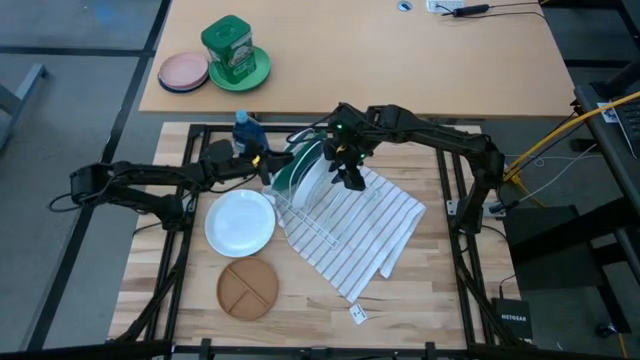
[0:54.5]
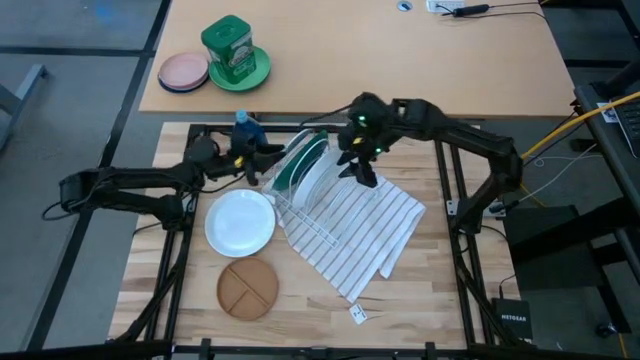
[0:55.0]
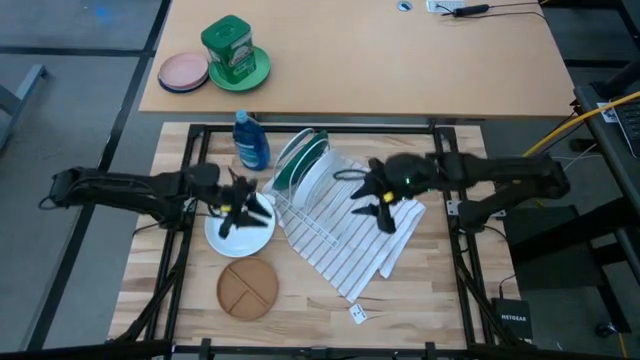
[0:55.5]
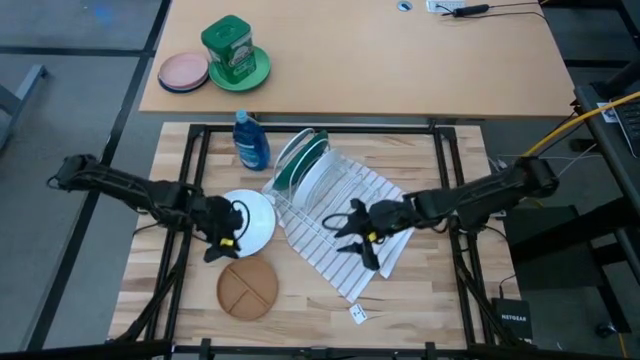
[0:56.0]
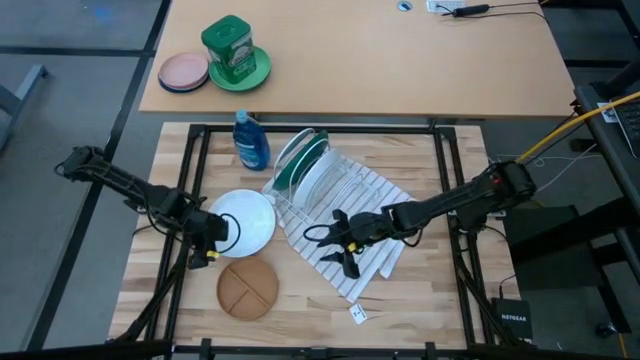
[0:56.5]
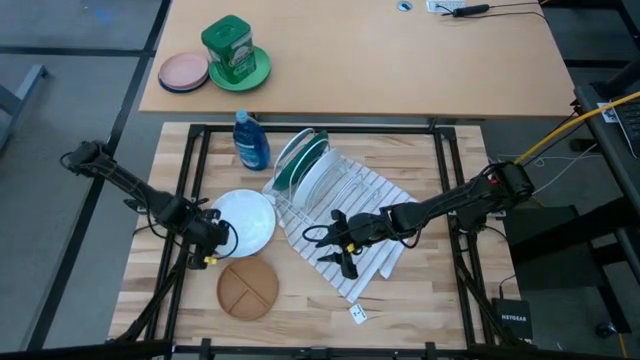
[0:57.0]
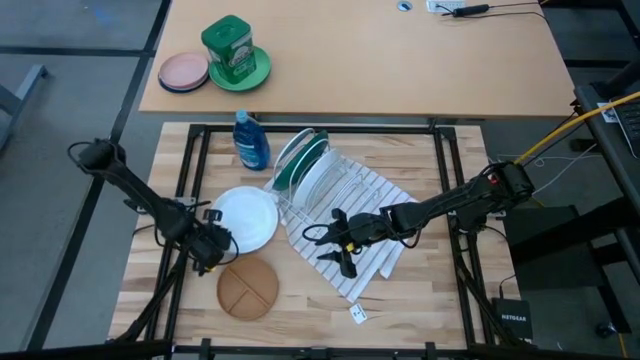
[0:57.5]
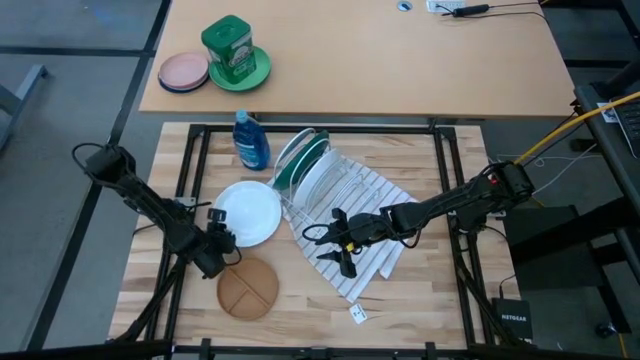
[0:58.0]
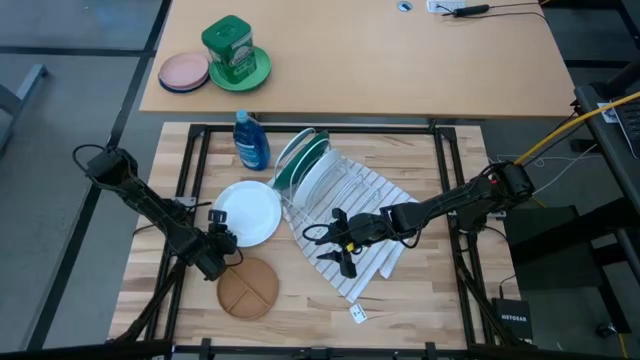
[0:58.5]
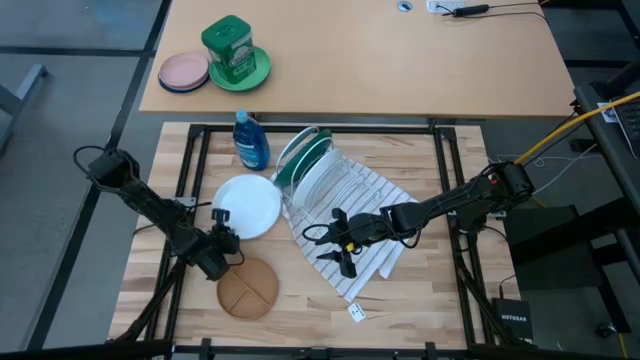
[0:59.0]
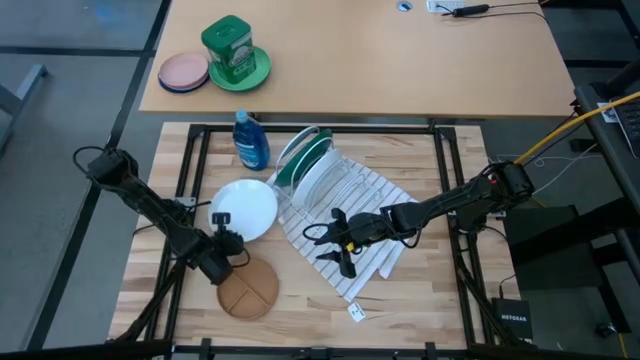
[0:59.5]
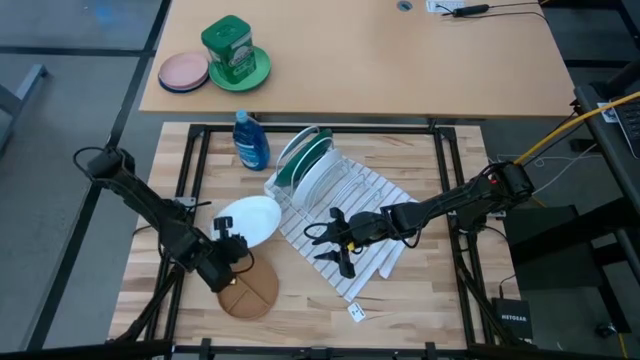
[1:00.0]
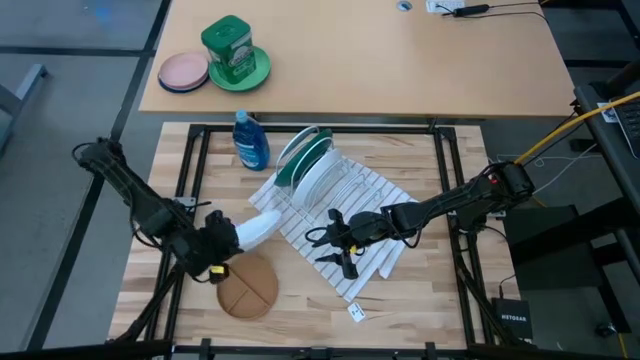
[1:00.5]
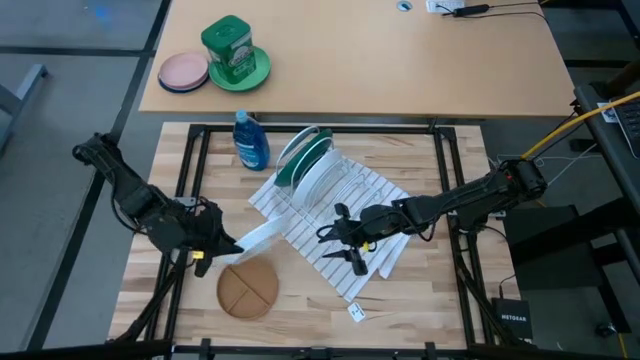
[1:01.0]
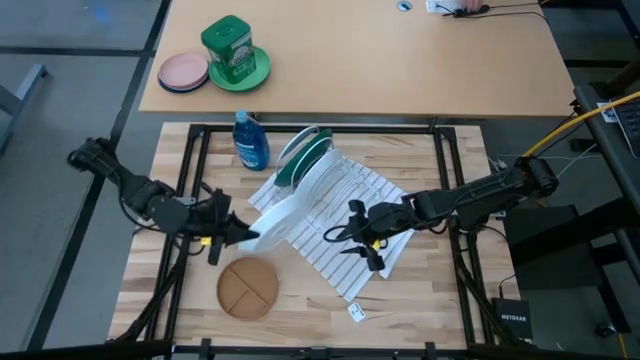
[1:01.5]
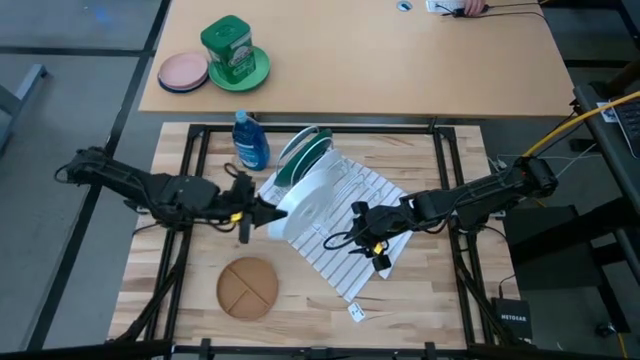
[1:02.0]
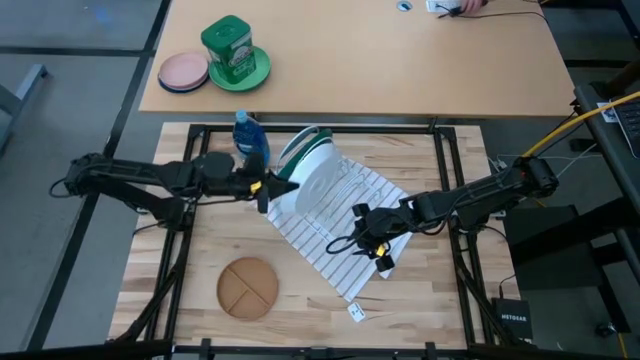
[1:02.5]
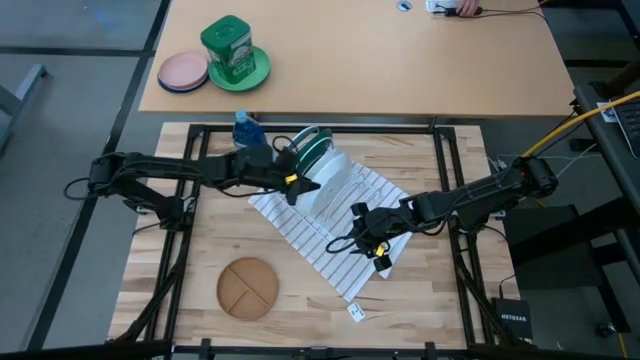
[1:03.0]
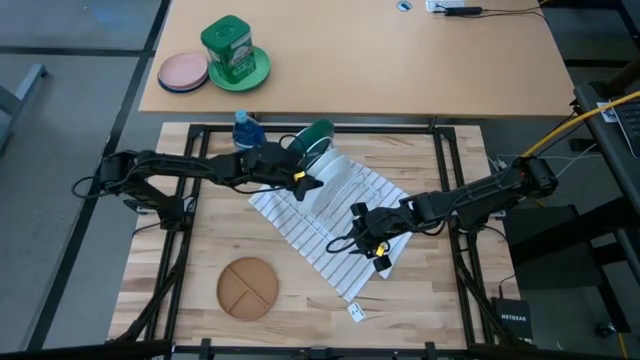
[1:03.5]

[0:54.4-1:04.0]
Task: Sort dishes
Put the white plate into the white dish rack

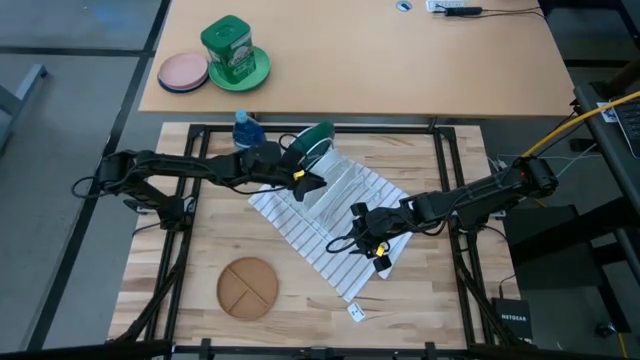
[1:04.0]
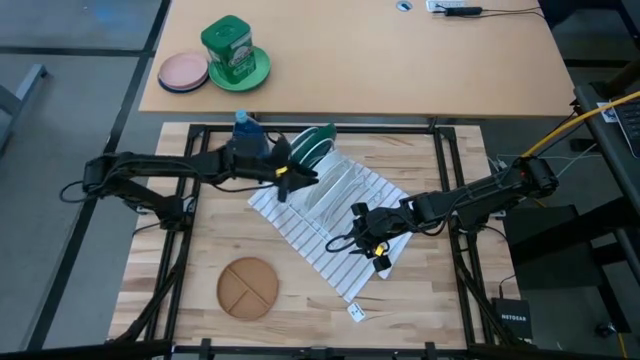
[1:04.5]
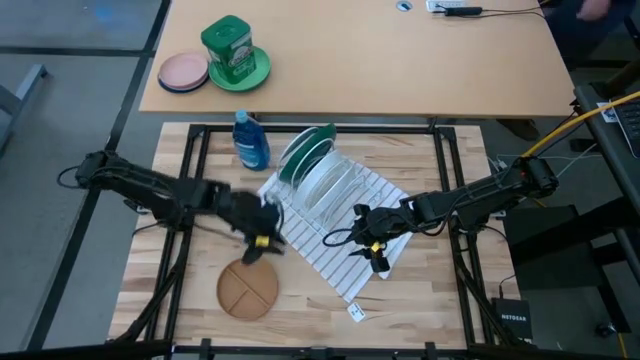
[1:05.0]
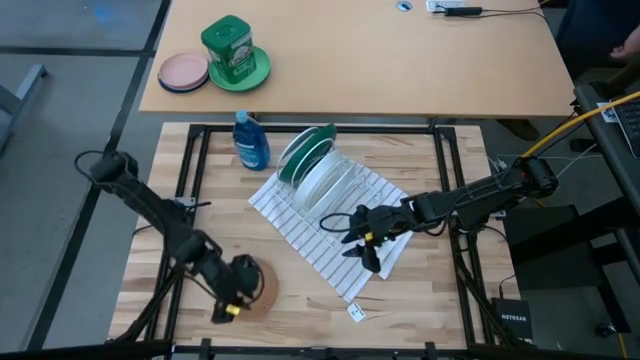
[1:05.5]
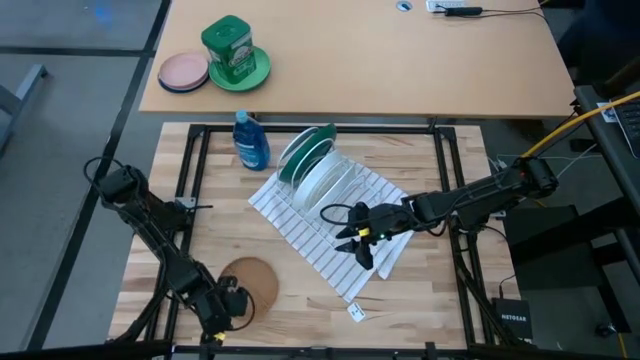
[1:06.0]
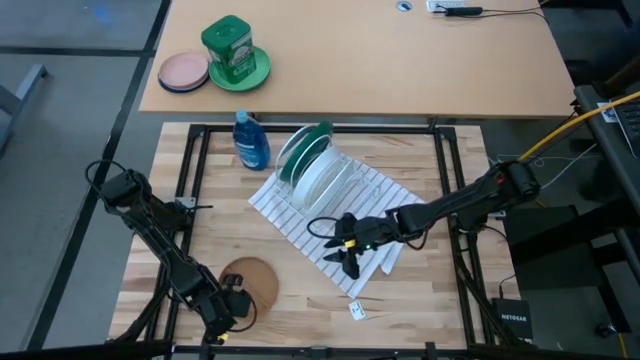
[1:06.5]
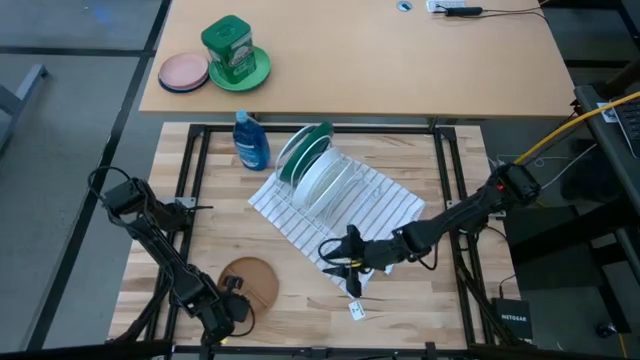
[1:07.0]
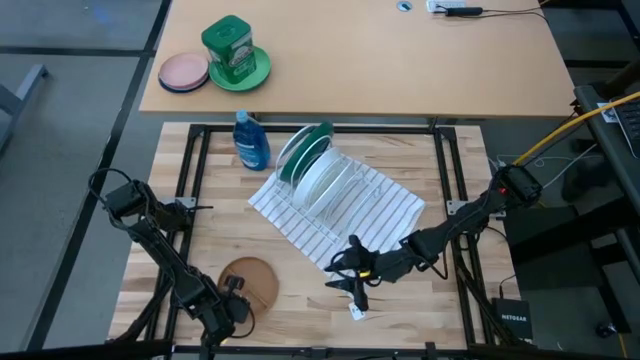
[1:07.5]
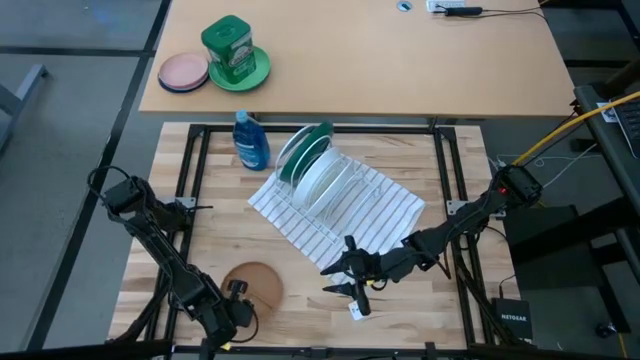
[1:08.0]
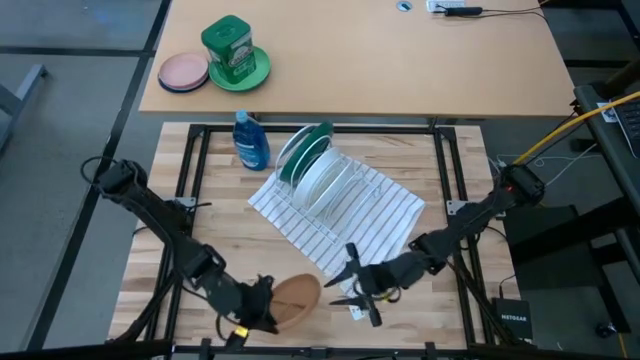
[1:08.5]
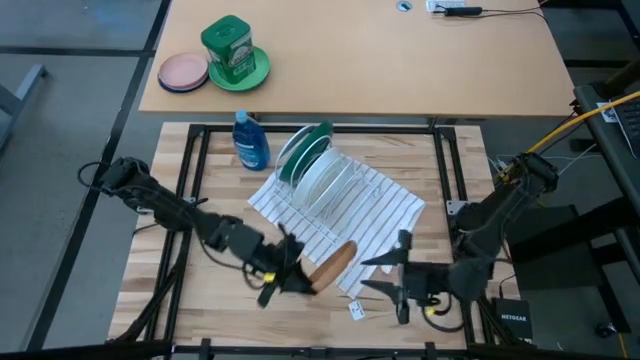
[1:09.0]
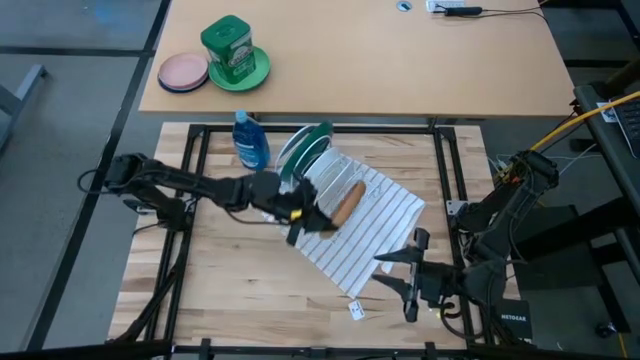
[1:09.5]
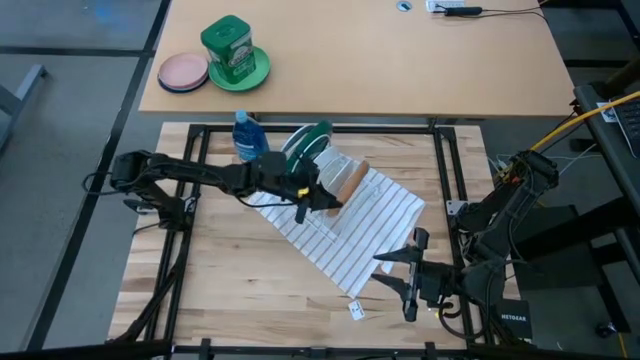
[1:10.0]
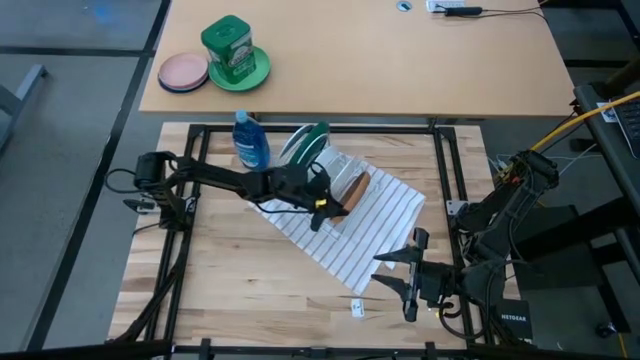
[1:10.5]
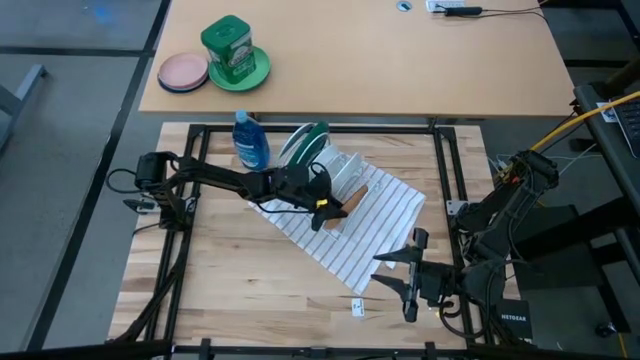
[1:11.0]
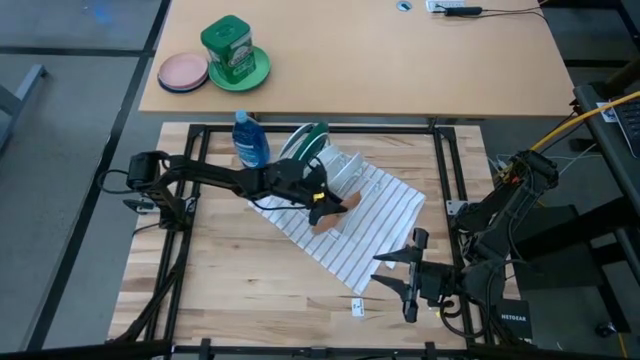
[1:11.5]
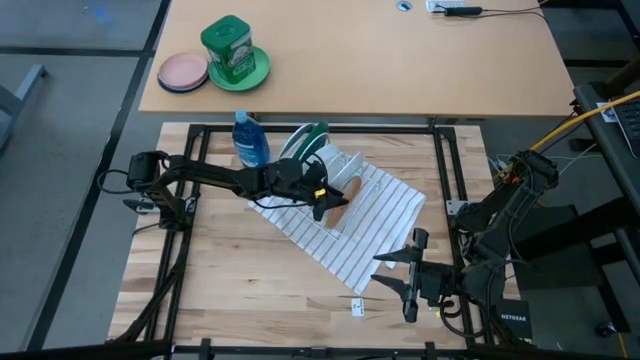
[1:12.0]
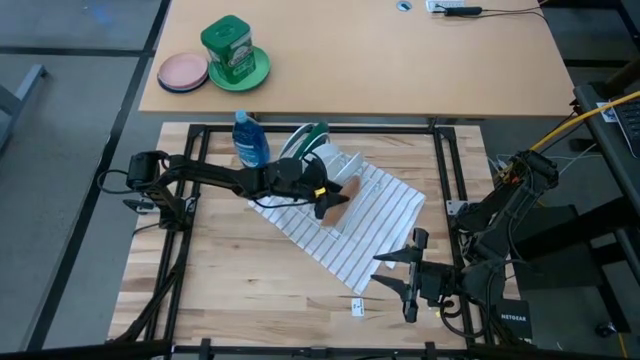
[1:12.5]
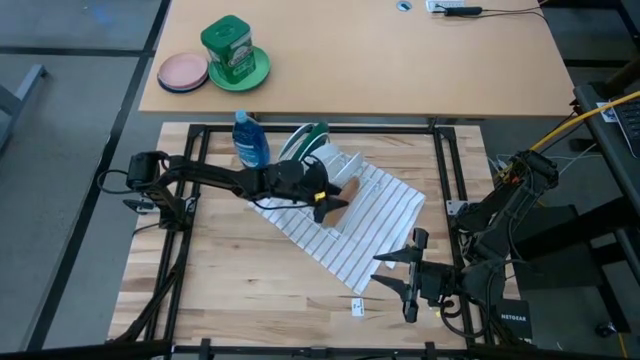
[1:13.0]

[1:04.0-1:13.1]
Put the brown plate into the white dish rack

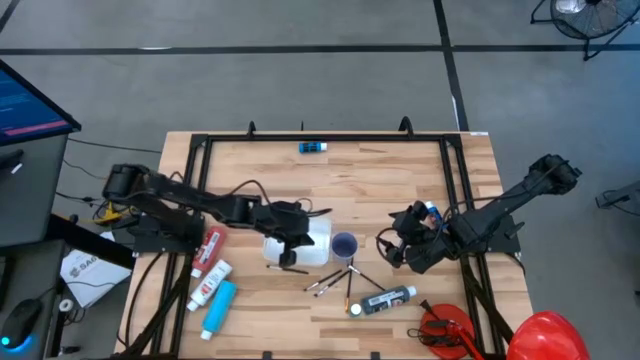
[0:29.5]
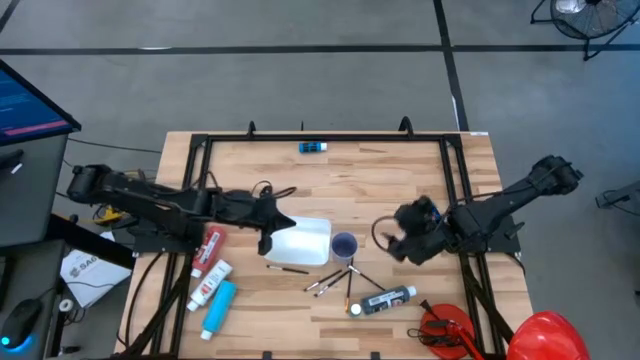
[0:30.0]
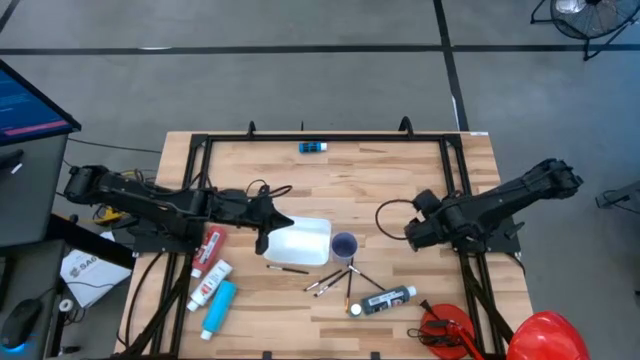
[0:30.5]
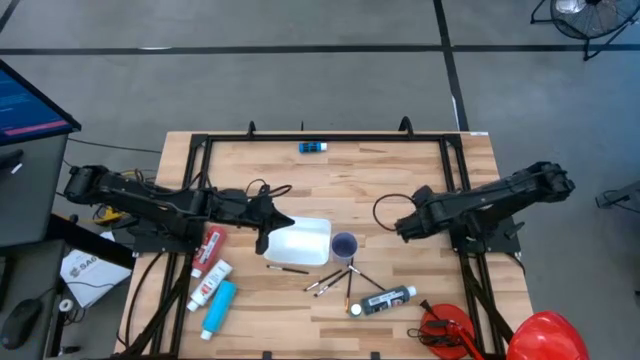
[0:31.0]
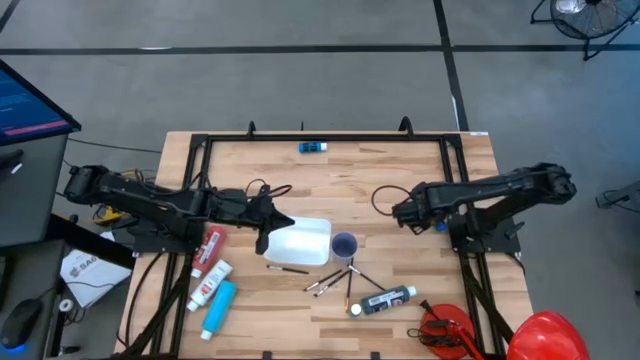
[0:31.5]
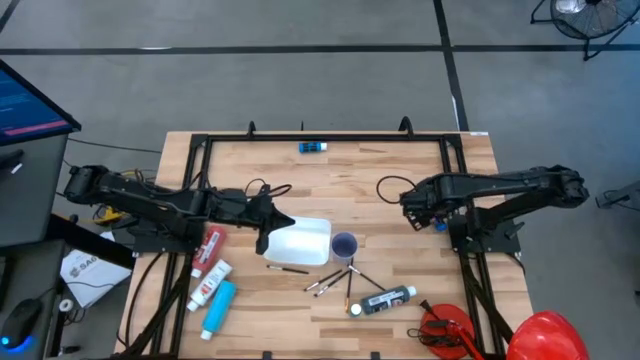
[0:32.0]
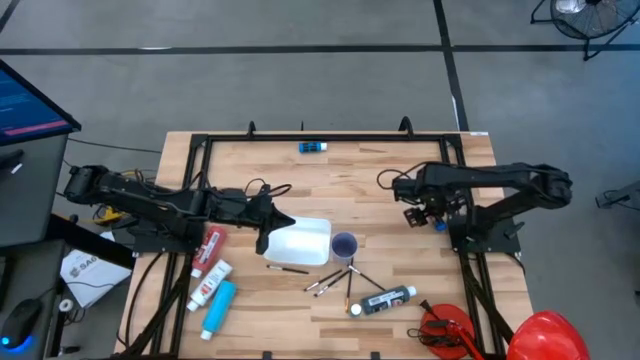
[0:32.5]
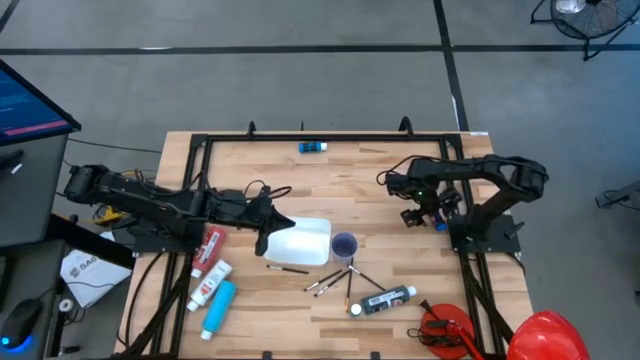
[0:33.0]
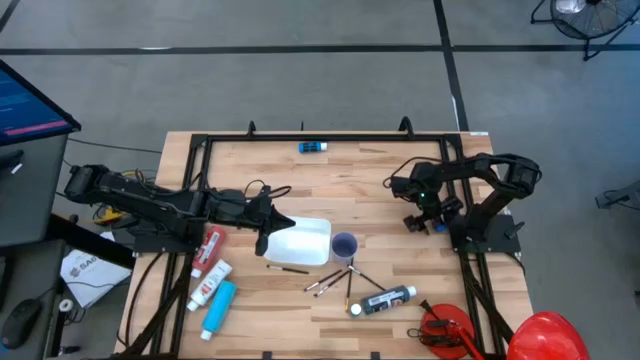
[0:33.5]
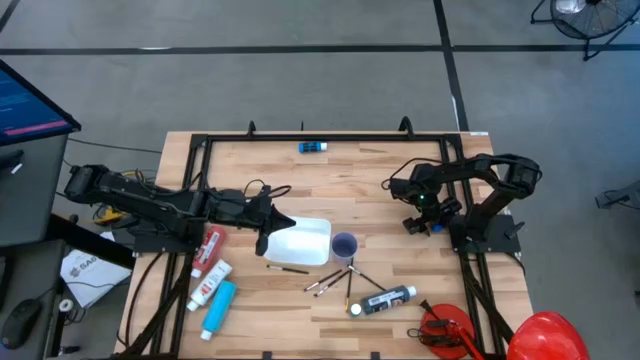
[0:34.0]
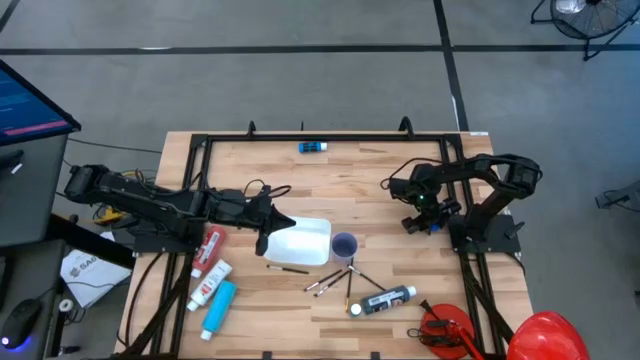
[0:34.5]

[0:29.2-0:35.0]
Task: Pick & Place Paint Supplies
Put the blue paint bottle into the white bin
